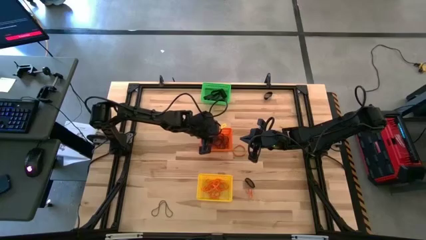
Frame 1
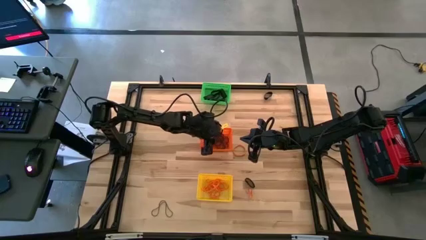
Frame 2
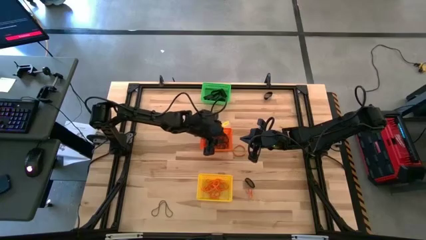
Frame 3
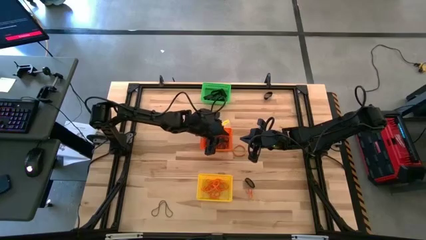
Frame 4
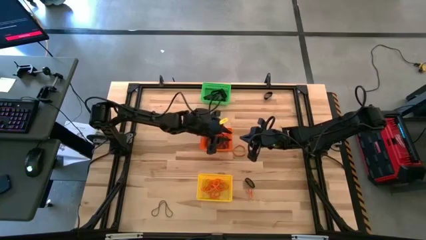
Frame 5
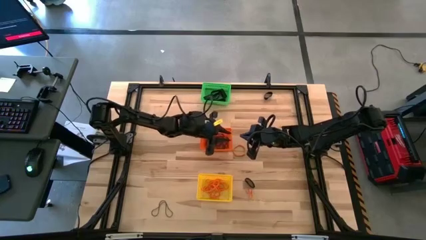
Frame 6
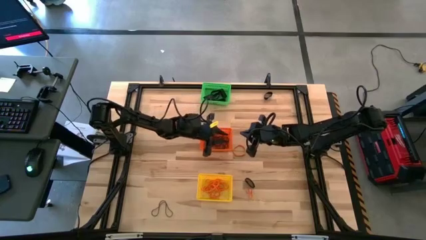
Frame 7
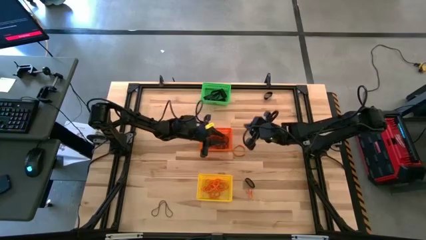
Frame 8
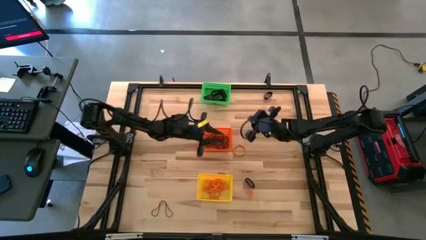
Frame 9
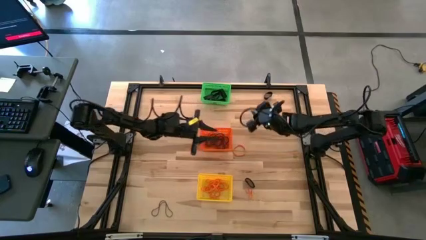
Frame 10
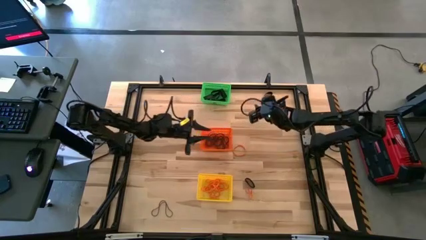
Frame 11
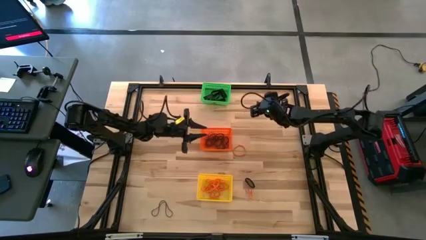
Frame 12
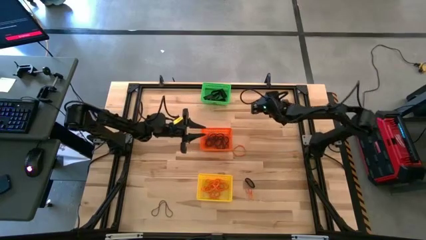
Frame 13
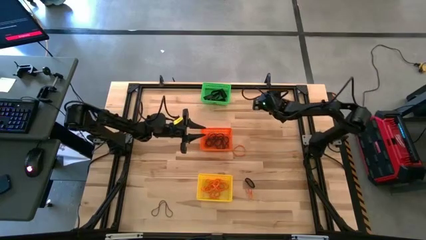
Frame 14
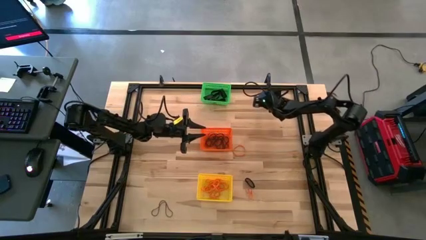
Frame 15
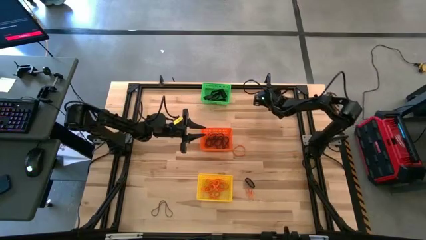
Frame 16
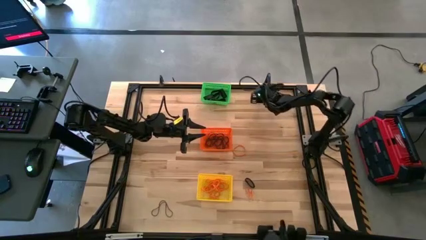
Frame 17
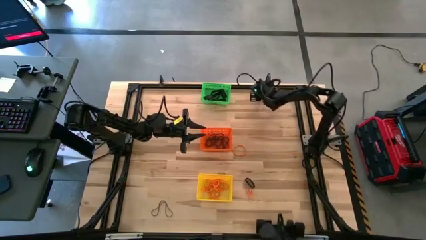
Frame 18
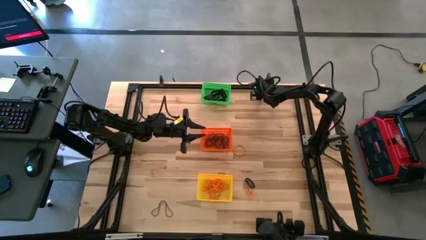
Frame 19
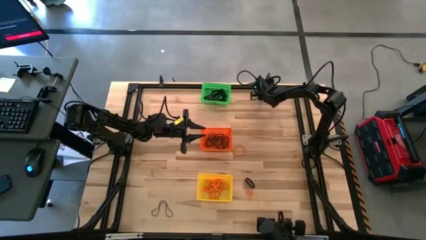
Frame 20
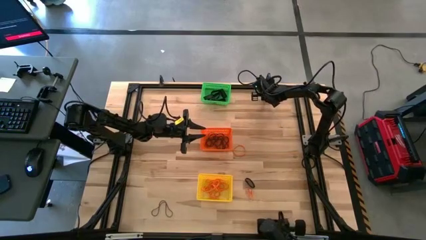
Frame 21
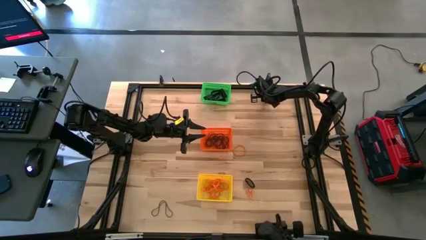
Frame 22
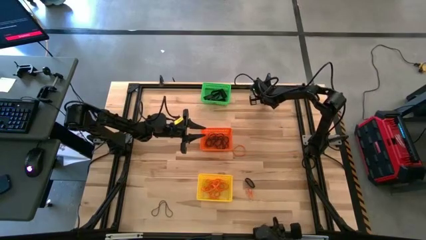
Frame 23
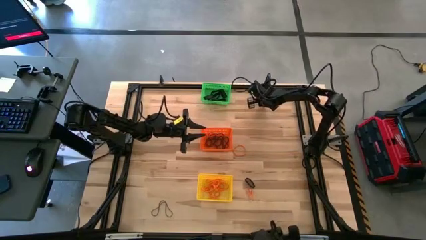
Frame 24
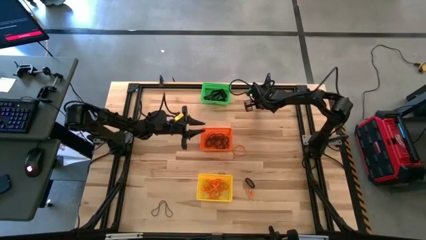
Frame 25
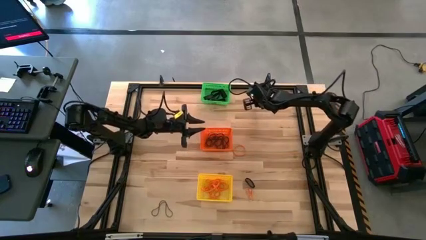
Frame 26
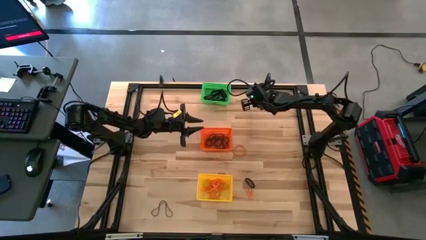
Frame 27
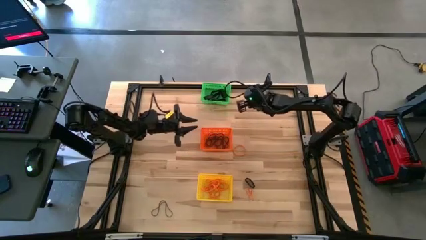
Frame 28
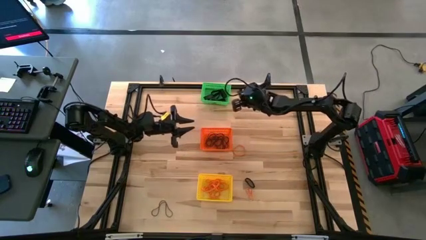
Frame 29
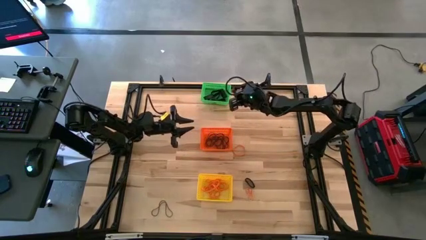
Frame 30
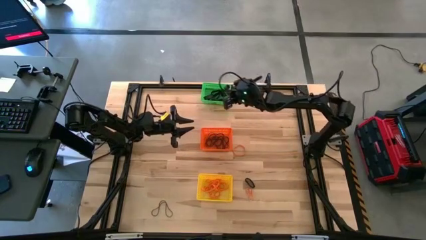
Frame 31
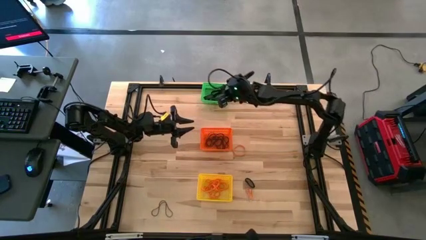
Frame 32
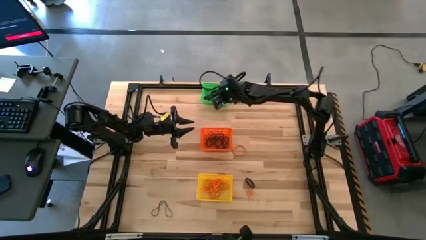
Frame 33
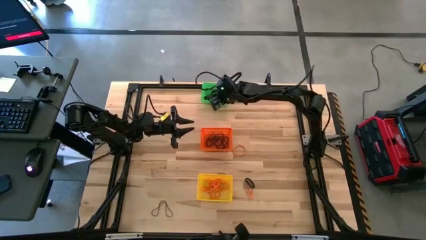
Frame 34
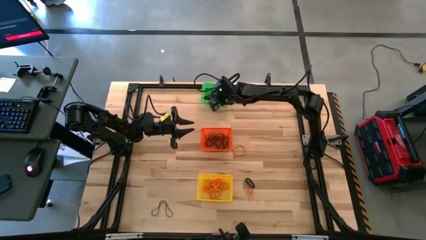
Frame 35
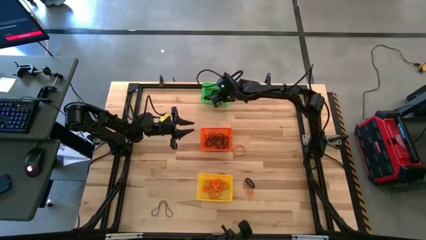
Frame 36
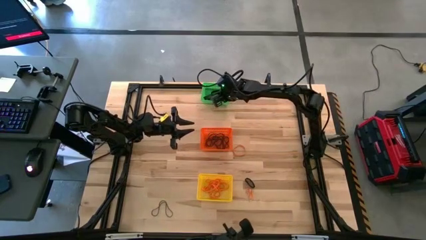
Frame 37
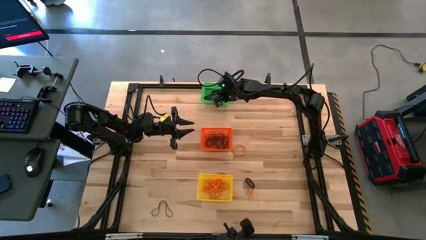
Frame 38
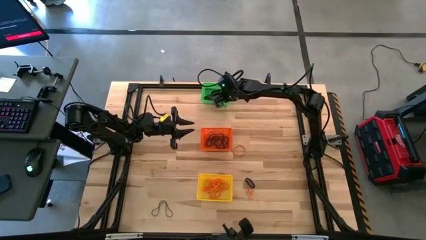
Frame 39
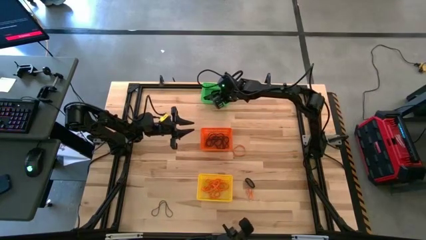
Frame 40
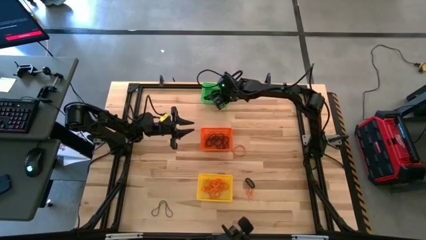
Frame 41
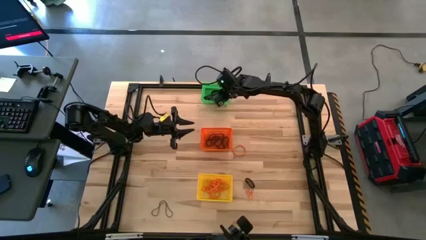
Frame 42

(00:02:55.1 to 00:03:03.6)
Task: Sort rubber bands into baskets
Put the black rubber band into the green bin

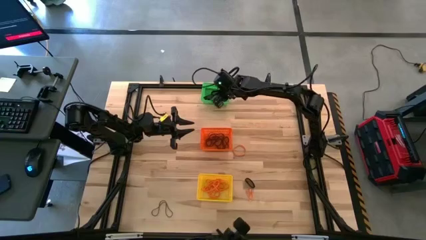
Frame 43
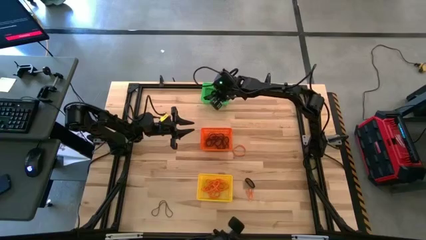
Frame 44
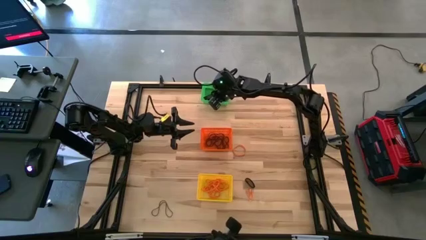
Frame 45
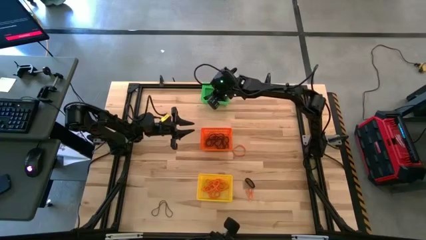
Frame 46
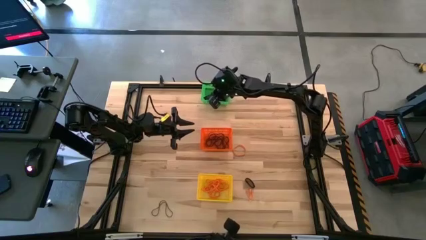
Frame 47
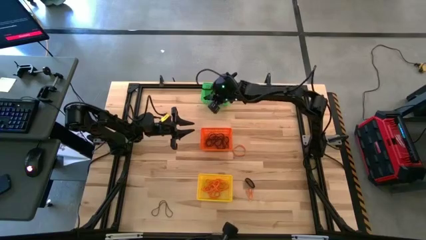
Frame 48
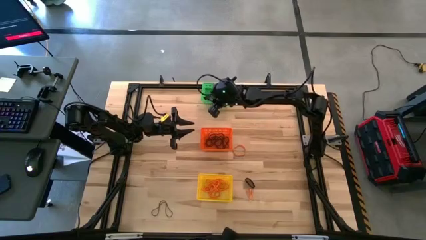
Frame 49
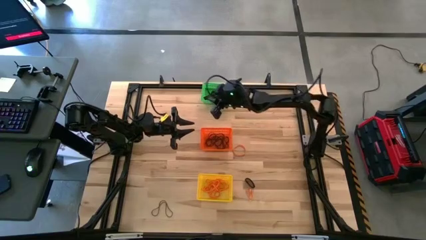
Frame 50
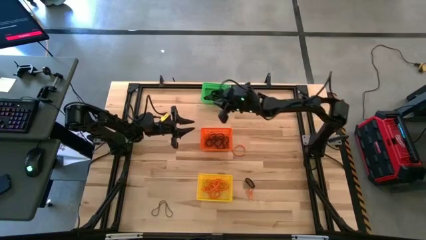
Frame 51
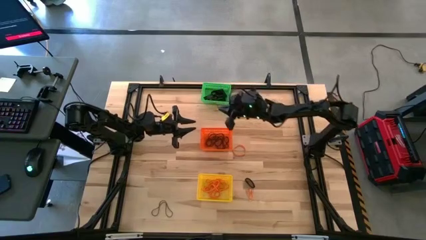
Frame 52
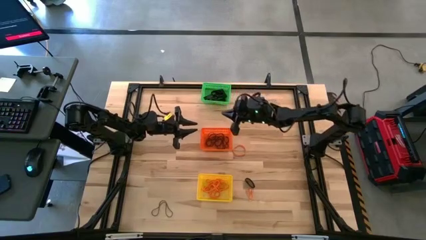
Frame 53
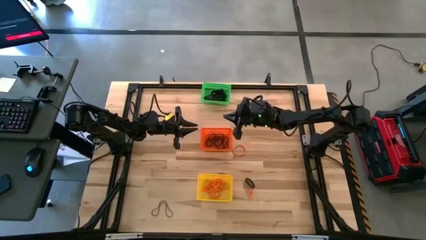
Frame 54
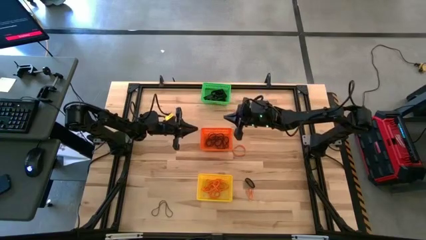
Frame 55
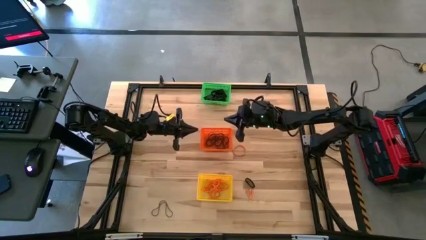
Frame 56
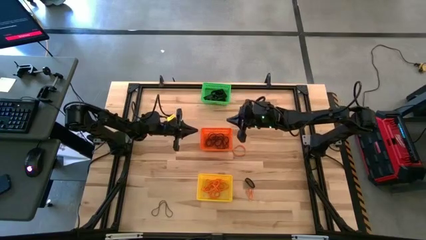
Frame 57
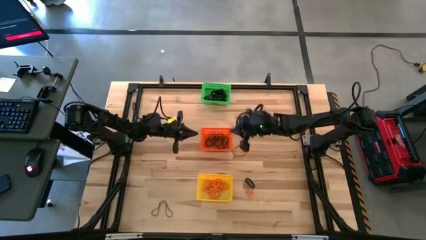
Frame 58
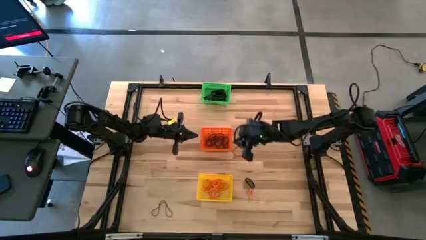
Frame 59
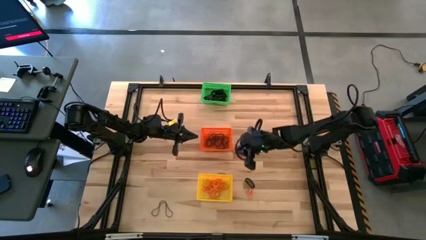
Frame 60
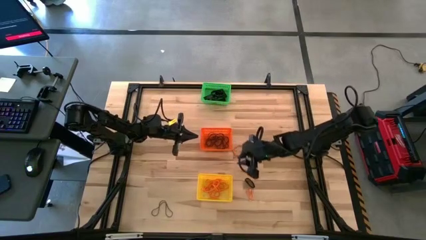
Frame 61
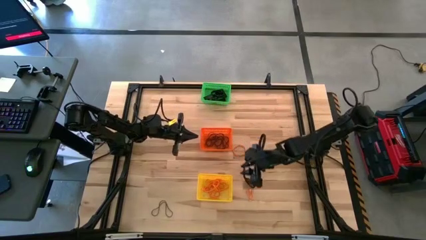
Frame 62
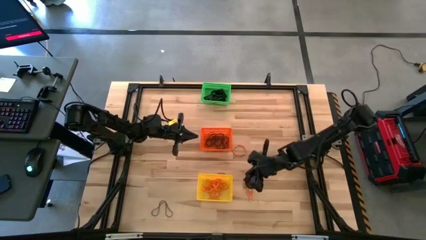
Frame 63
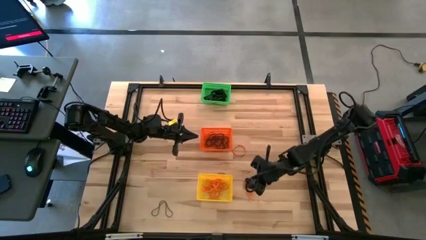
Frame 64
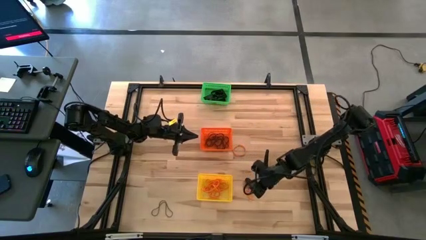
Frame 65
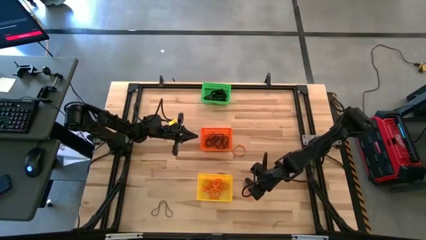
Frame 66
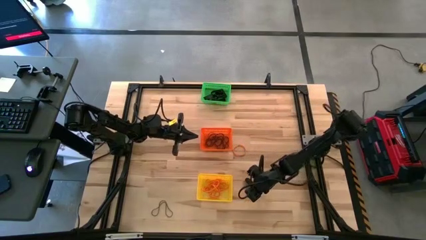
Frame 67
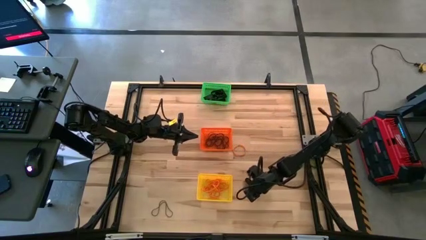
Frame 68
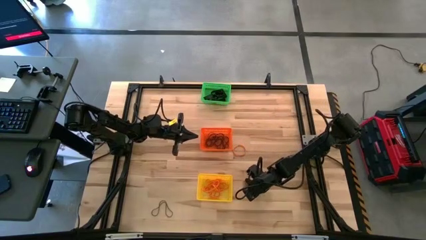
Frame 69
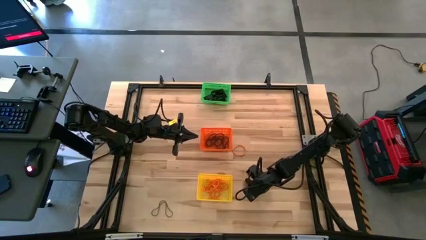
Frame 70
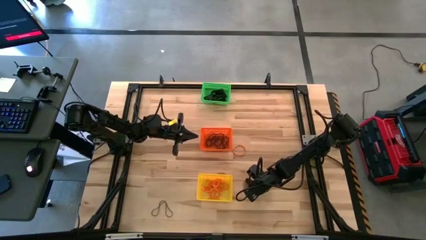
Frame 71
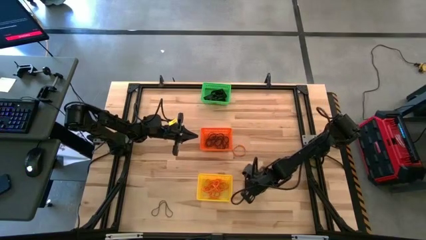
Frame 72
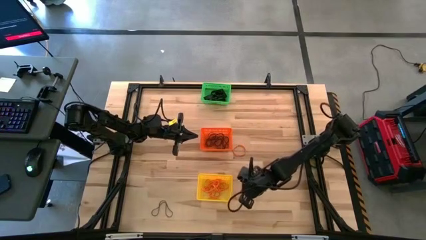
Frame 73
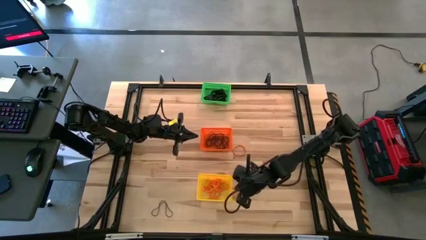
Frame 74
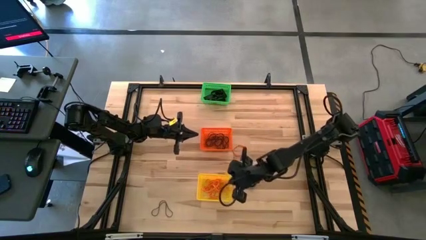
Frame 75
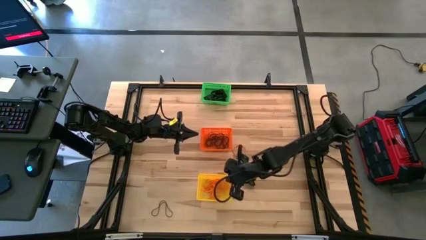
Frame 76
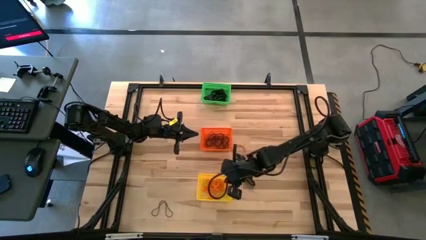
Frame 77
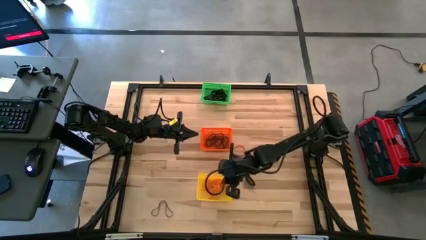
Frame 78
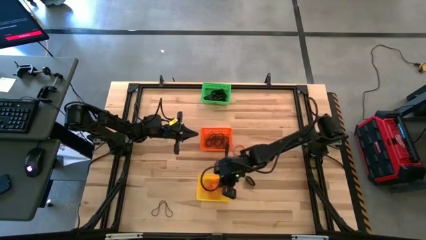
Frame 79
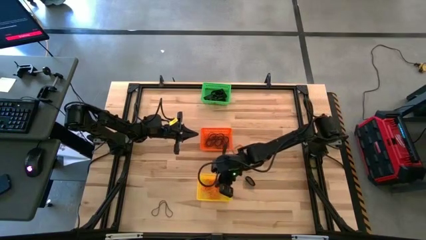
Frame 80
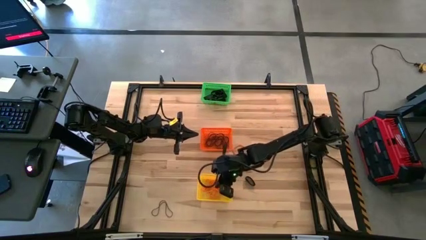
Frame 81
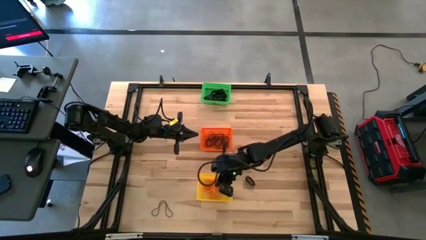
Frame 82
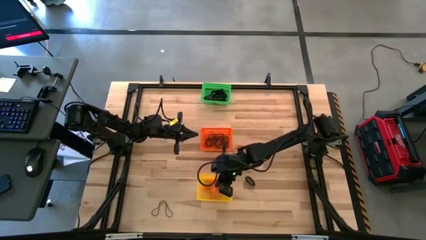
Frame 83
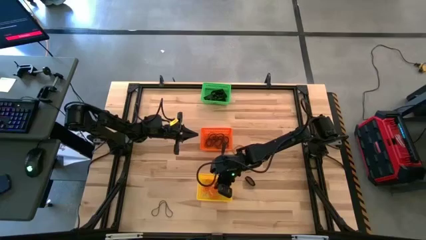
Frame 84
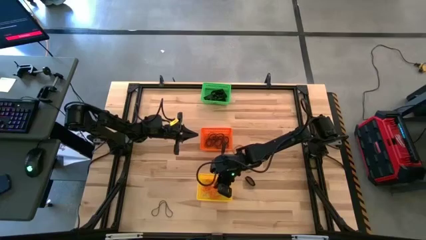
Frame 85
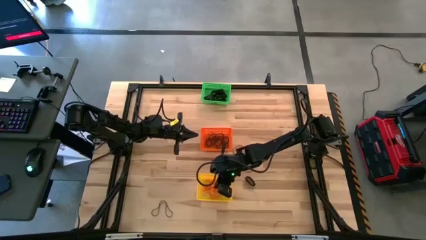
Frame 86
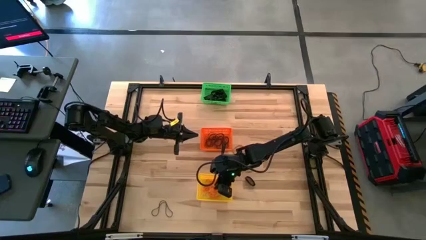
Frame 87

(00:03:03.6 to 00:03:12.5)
Put the orange rubber band into the yellow bin
